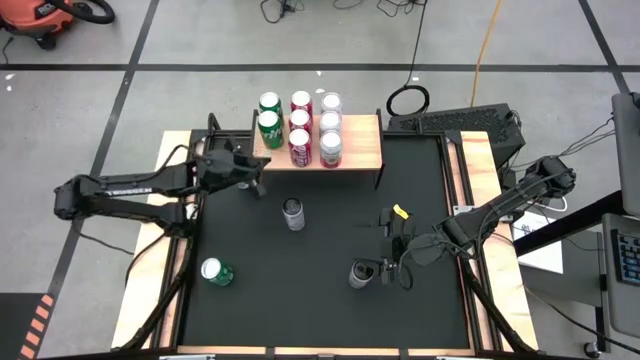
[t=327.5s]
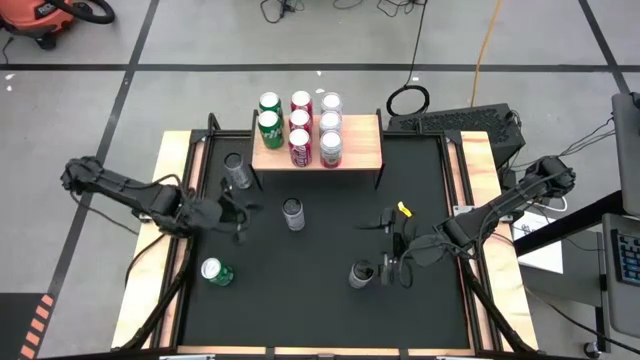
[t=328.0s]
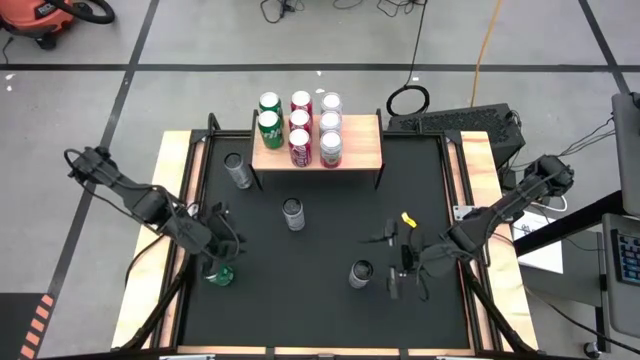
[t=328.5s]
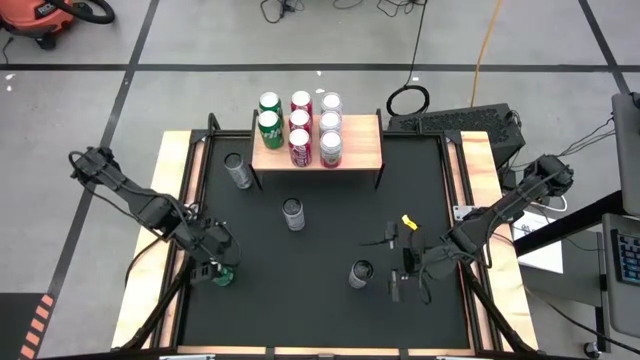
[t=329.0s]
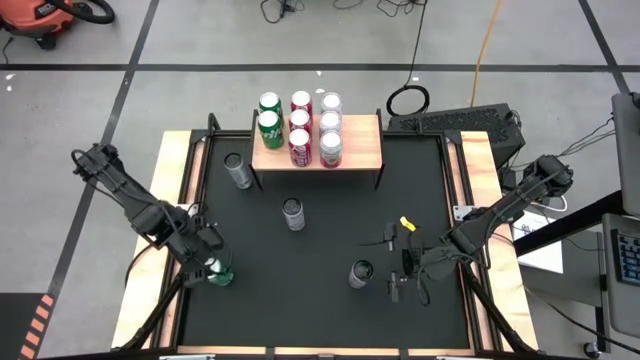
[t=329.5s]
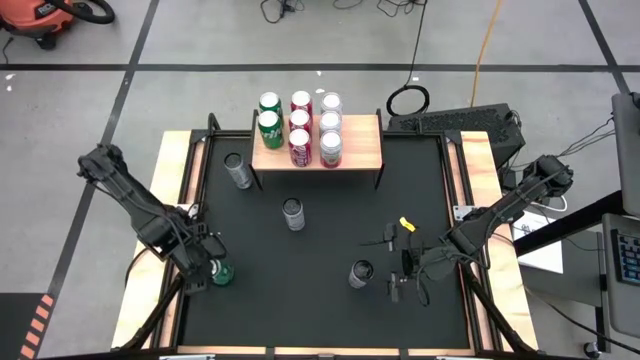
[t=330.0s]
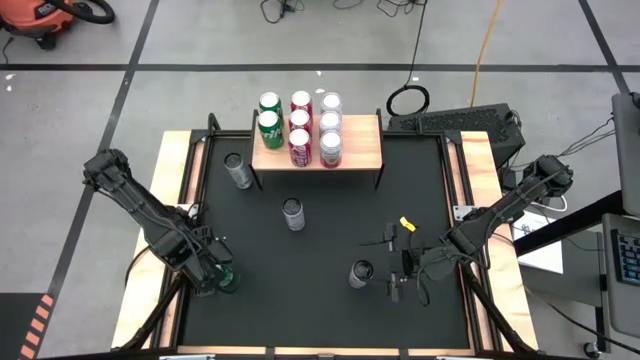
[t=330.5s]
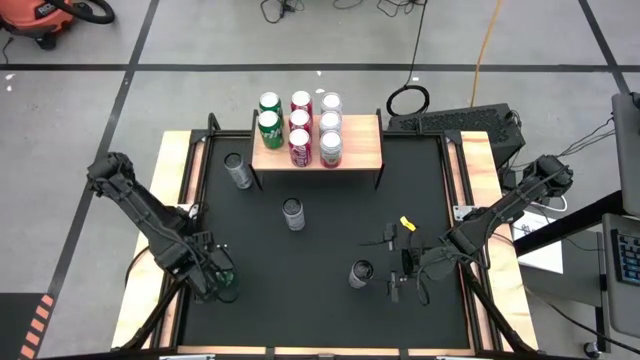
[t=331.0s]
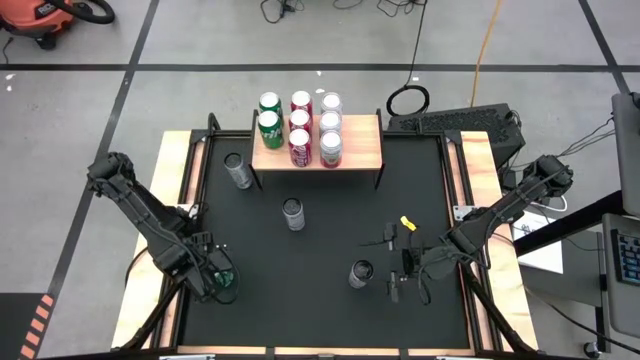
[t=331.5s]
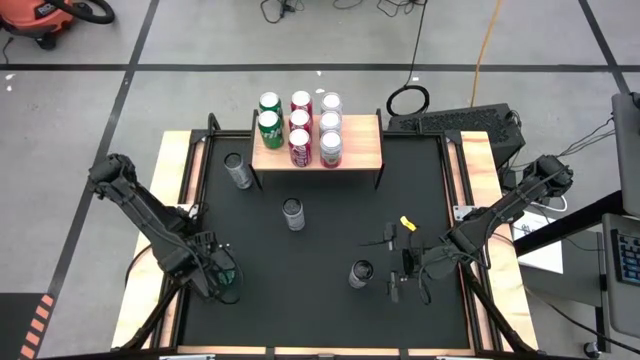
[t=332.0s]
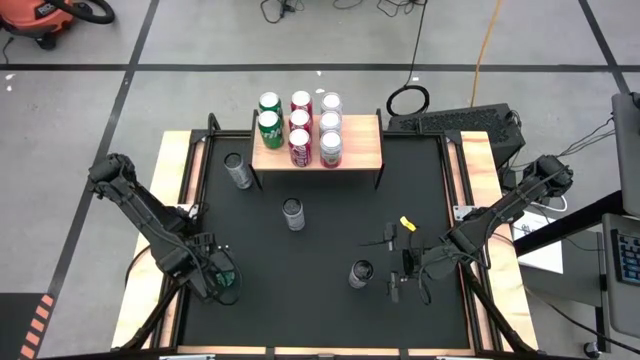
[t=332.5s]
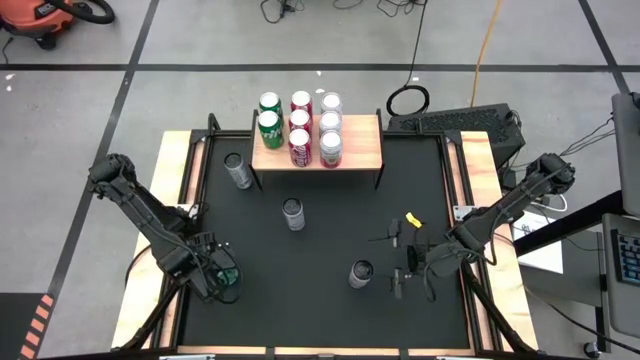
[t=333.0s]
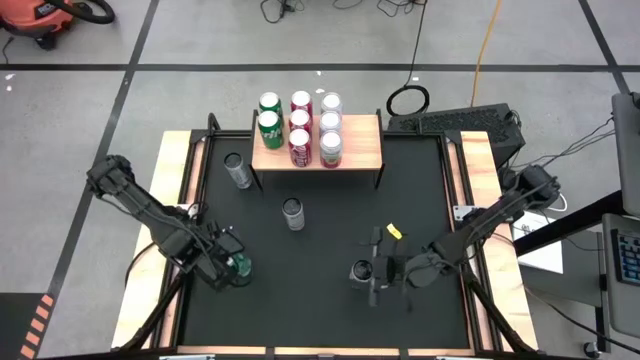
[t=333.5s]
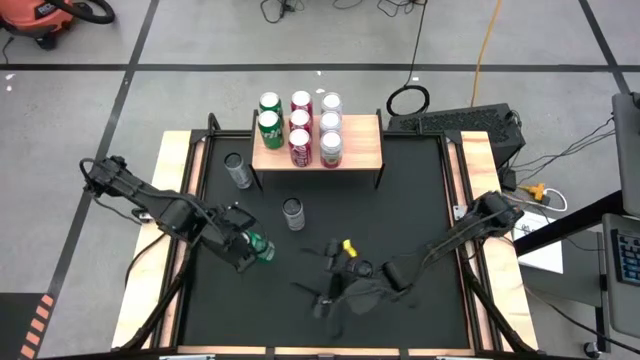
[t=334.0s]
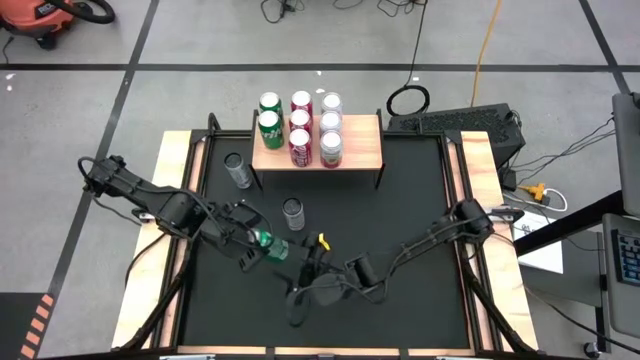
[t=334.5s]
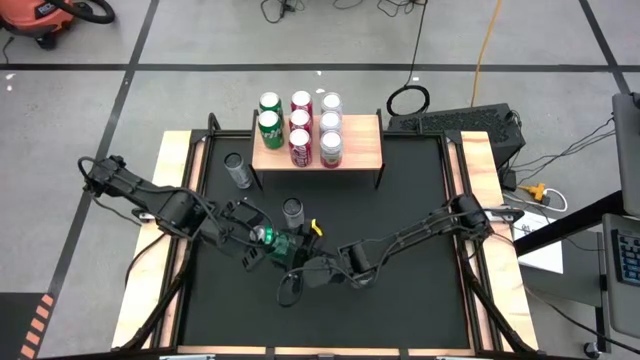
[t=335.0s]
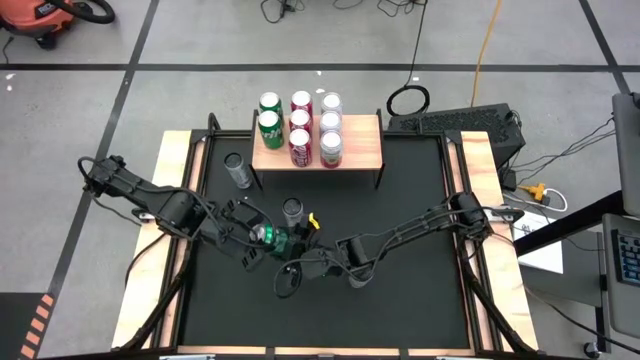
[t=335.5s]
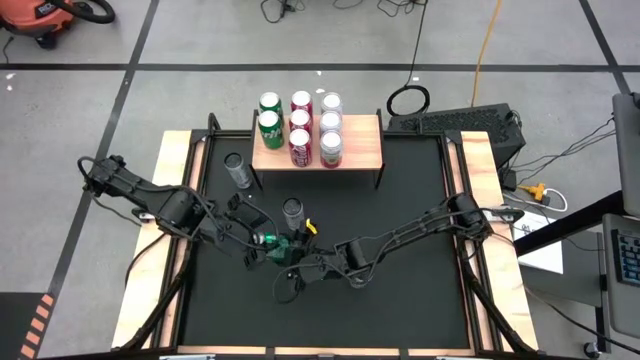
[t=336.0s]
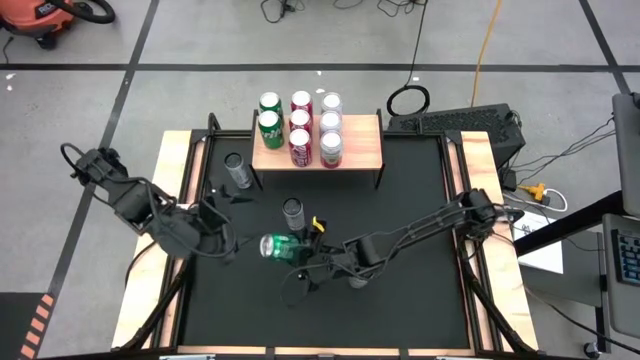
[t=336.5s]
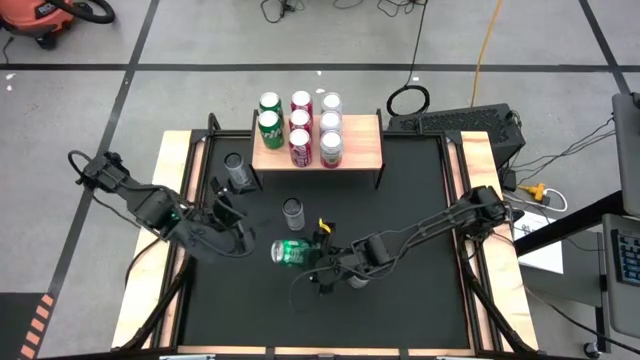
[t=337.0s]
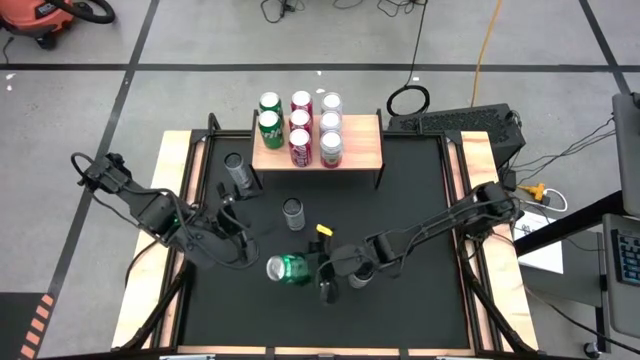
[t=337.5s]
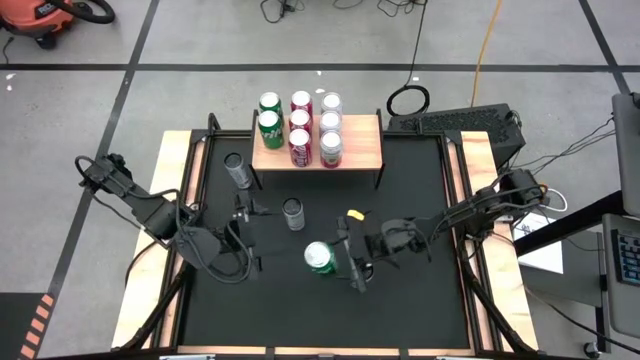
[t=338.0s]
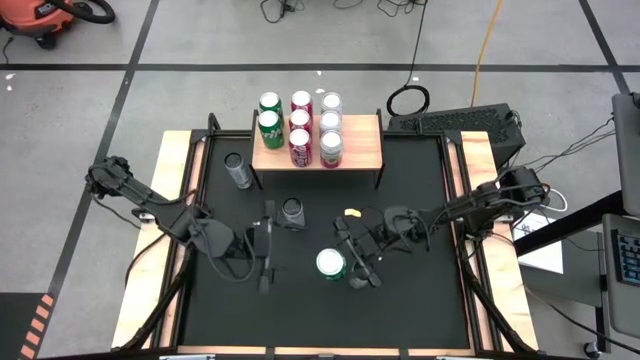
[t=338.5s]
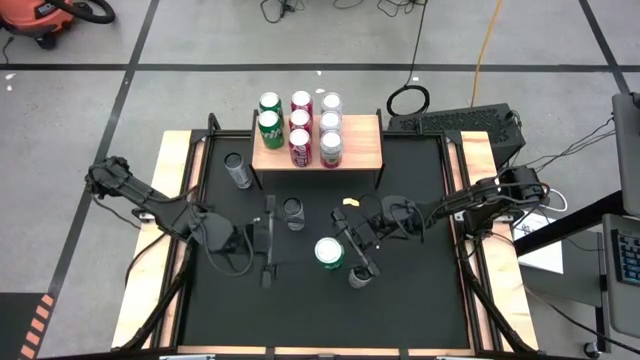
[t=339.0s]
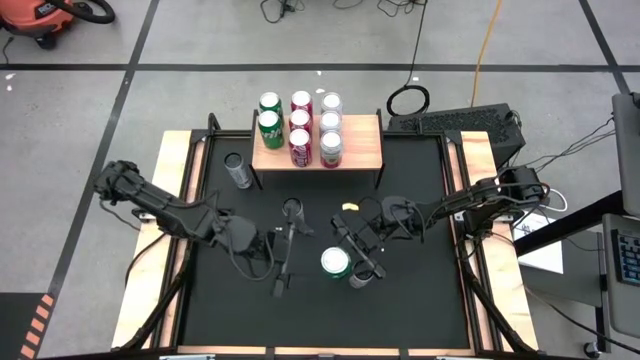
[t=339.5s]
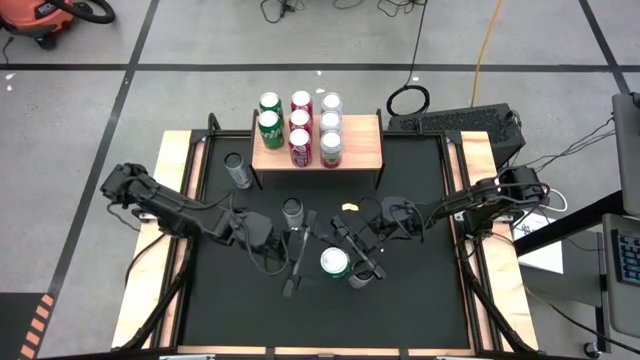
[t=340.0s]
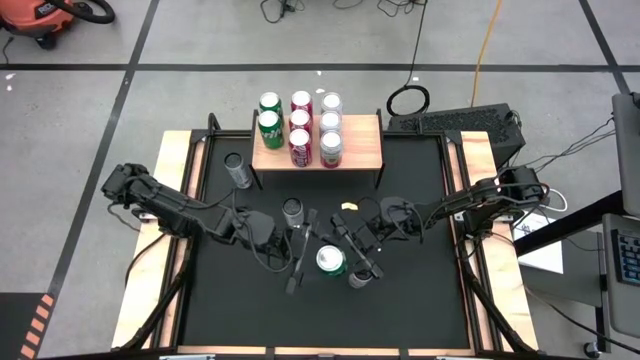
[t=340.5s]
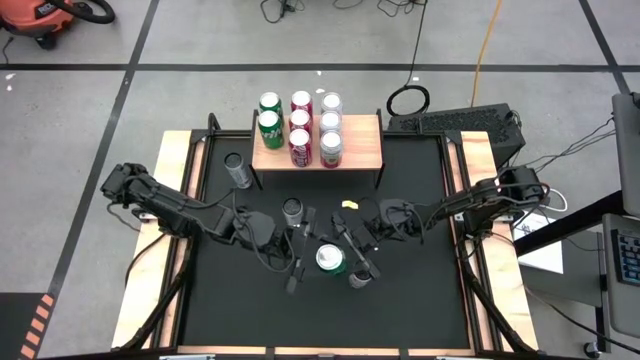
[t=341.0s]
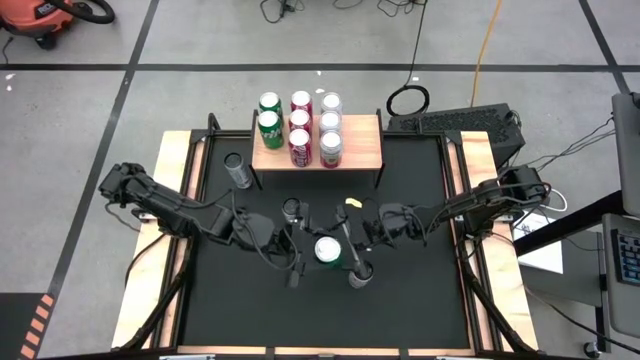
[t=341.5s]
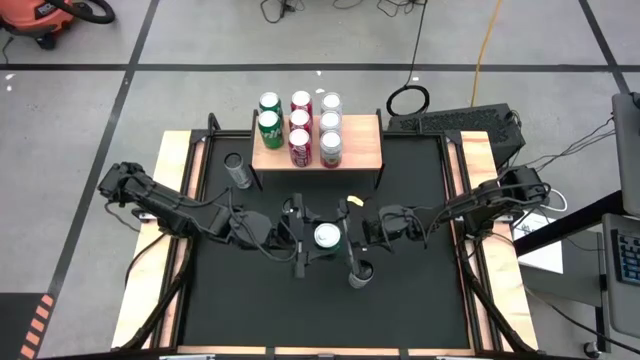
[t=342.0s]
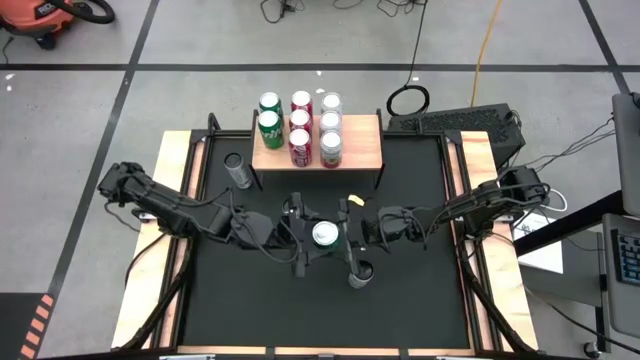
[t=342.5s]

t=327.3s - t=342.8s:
Task: Place canned beverage on shelf
Put the green soda can on the shelf aligned with the other green soda cans

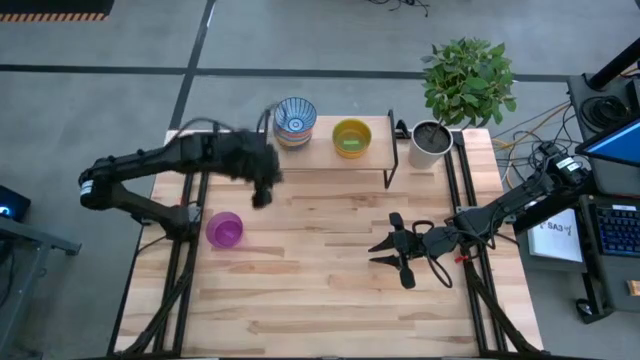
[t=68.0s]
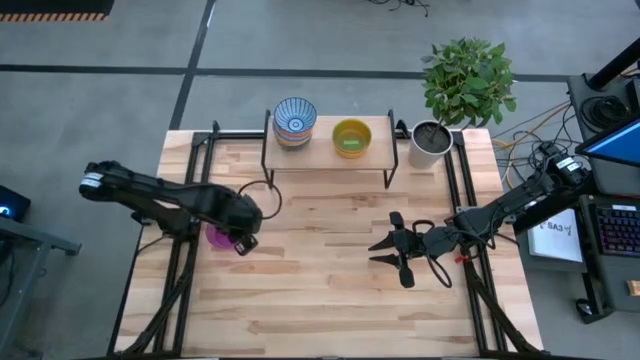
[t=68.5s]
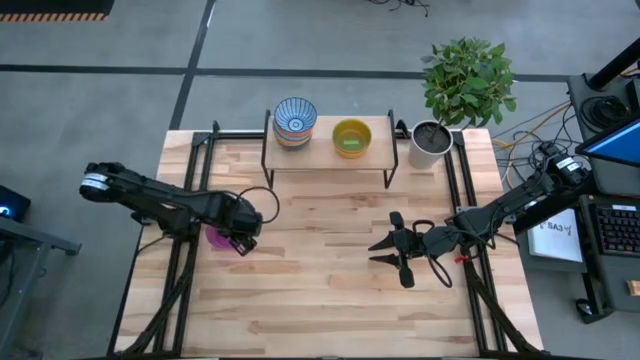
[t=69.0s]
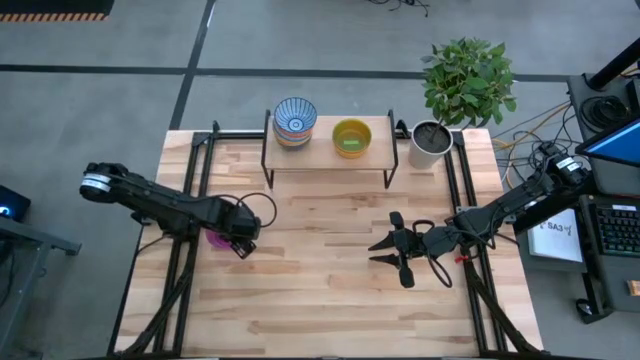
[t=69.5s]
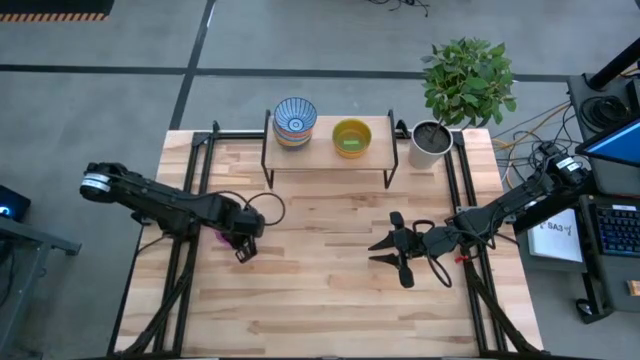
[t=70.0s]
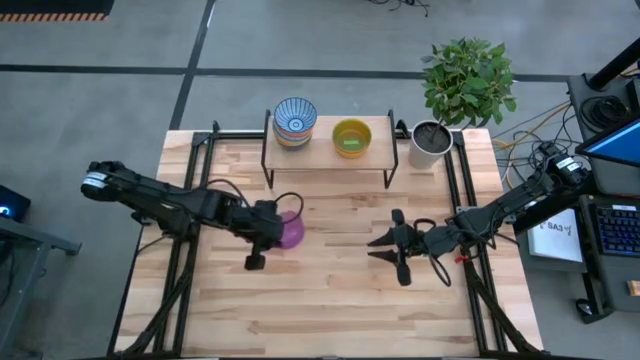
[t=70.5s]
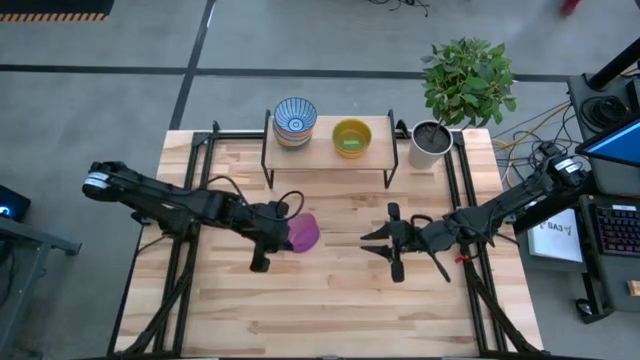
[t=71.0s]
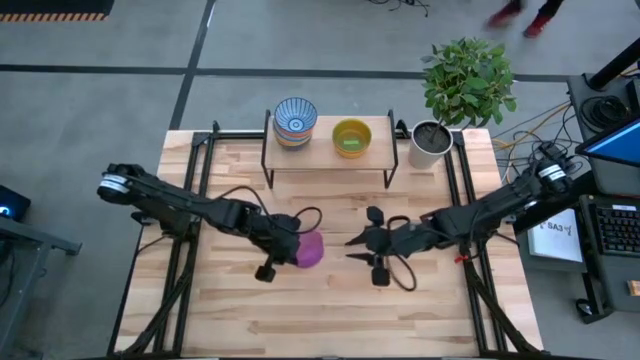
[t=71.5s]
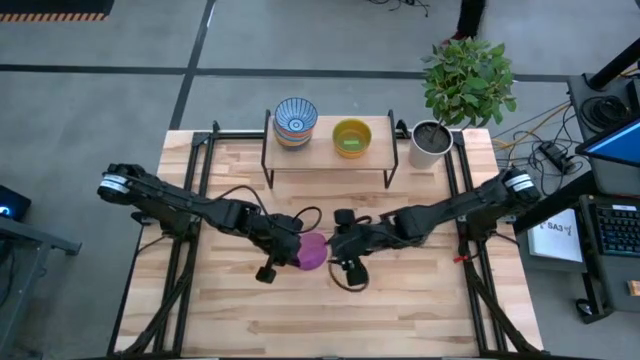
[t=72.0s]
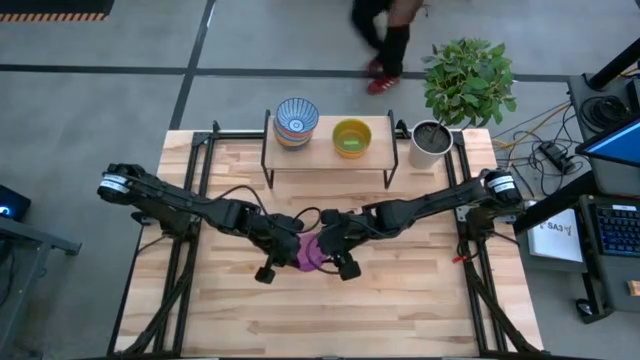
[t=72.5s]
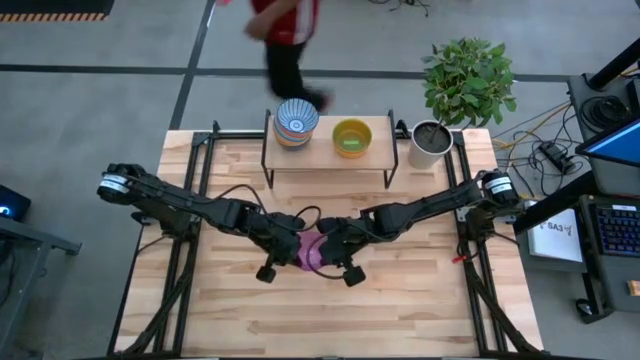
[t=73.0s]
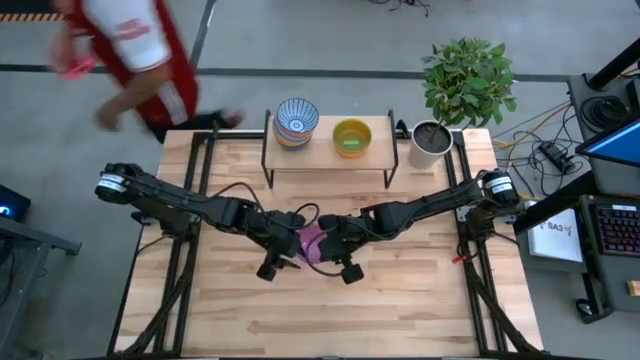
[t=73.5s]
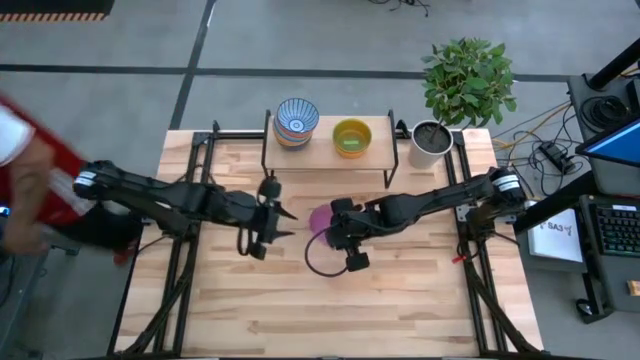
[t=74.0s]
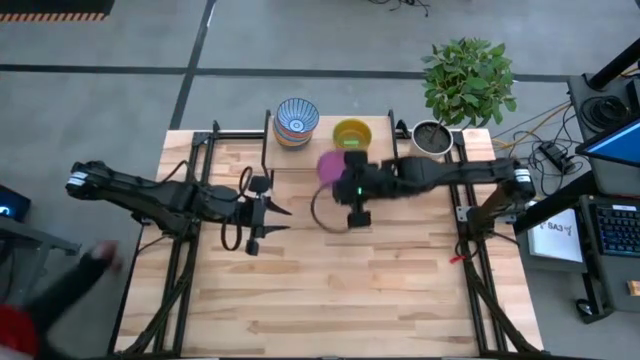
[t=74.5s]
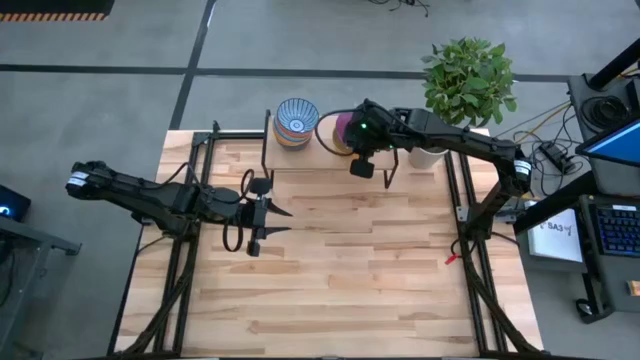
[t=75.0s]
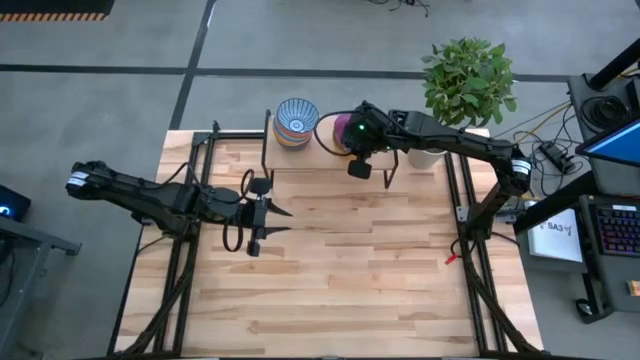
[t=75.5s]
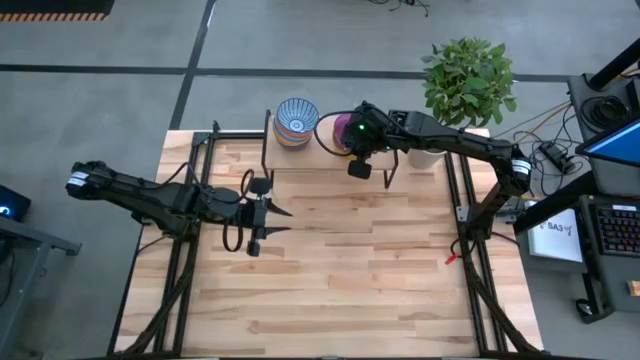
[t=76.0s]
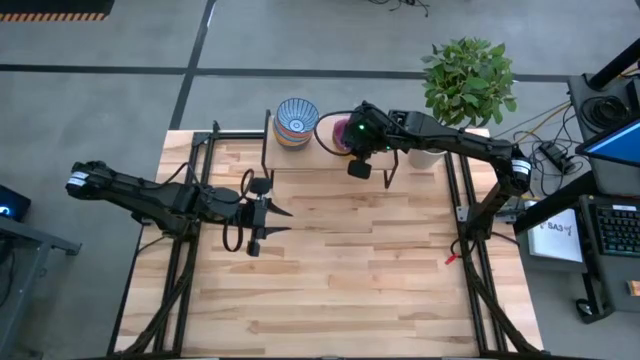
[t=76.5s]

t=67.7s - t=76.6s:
Task: Place and stack bowls onto a shelf
Stack the violet bowl on top of the green bowl on the shelf
